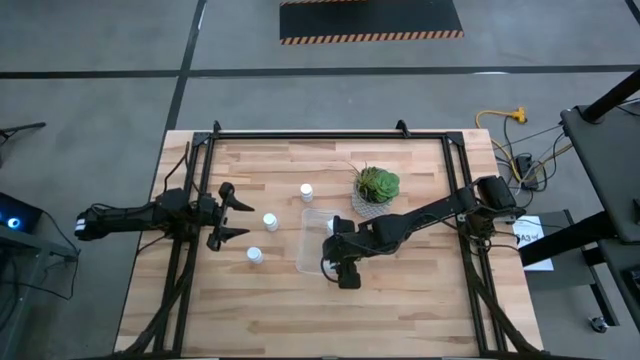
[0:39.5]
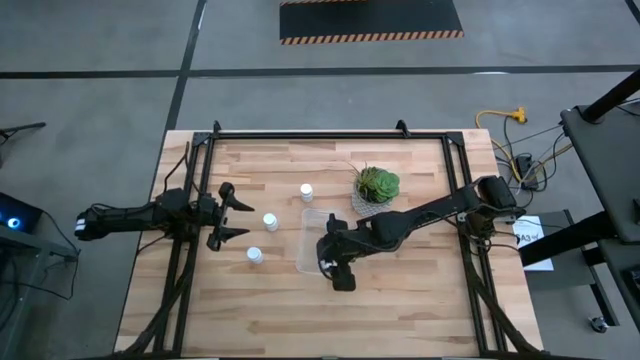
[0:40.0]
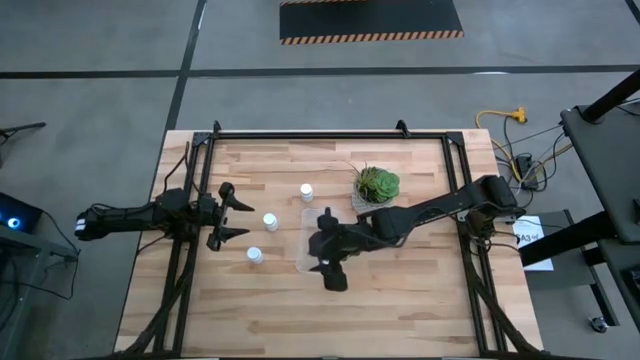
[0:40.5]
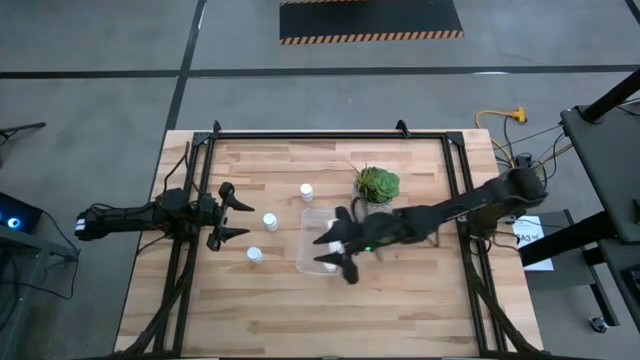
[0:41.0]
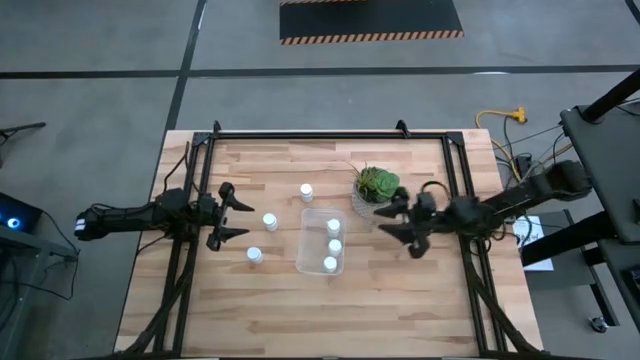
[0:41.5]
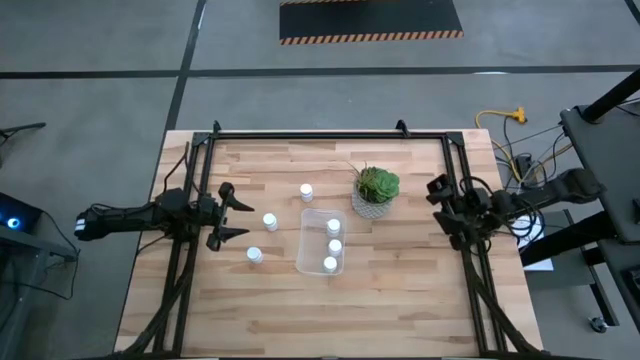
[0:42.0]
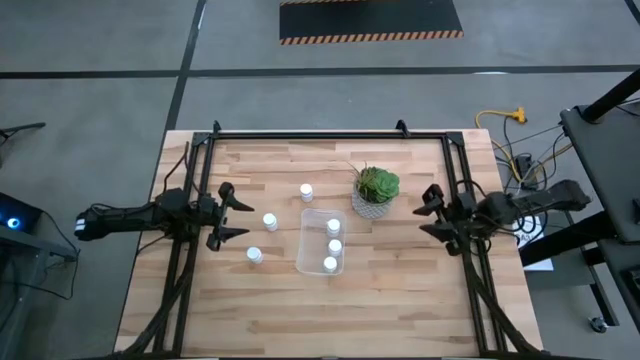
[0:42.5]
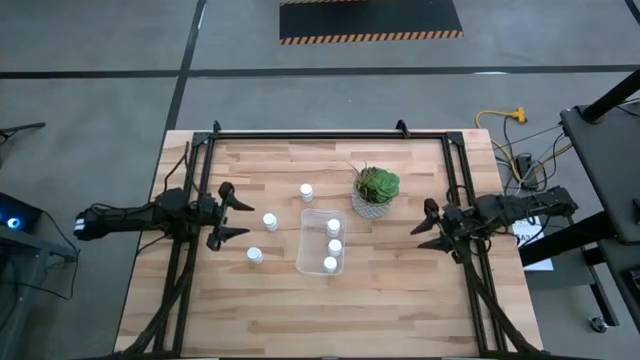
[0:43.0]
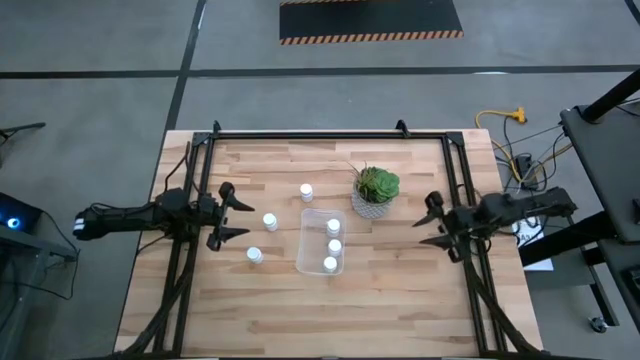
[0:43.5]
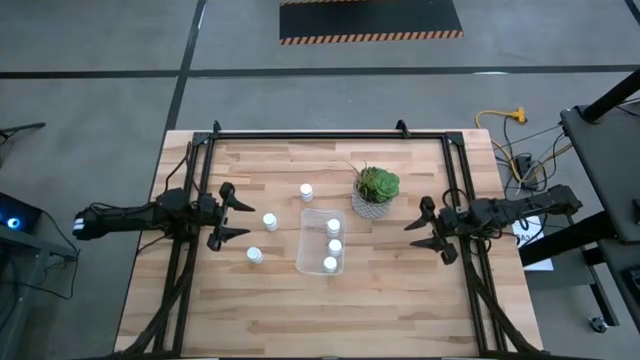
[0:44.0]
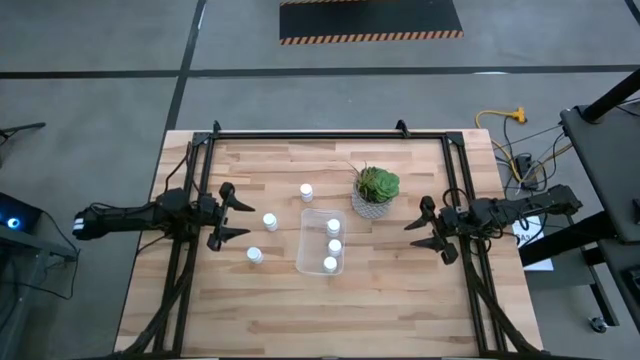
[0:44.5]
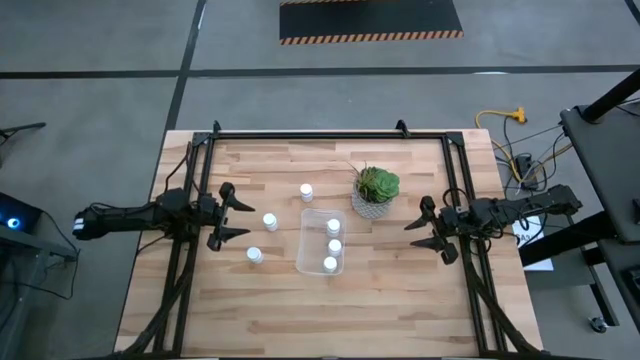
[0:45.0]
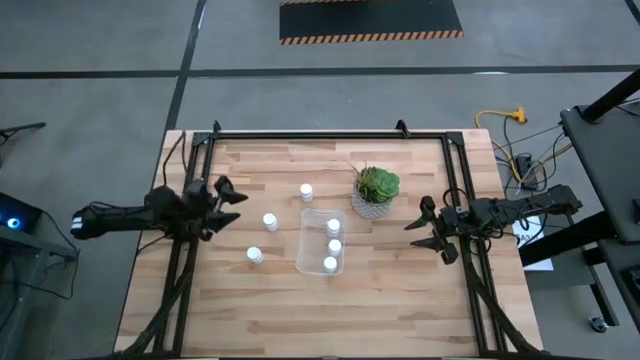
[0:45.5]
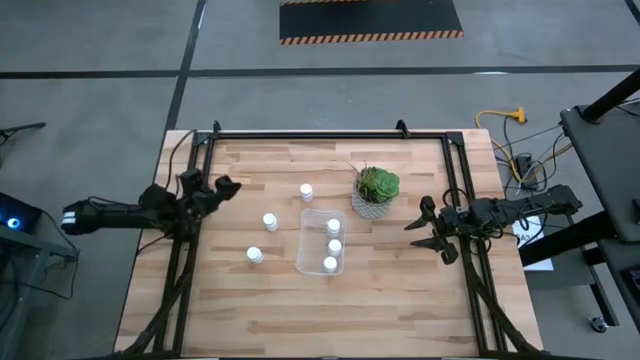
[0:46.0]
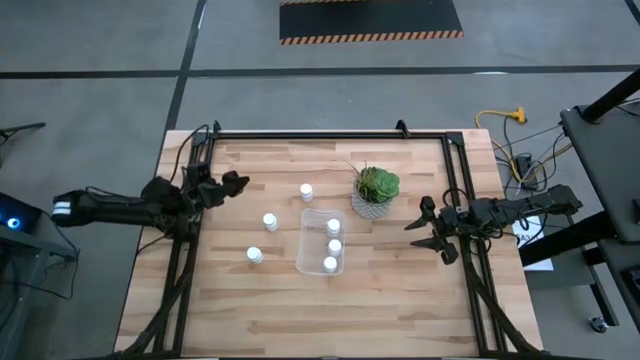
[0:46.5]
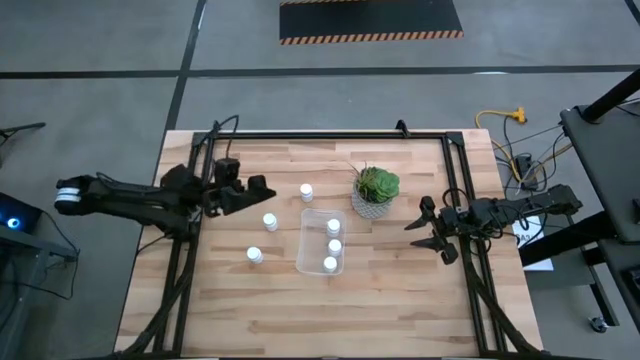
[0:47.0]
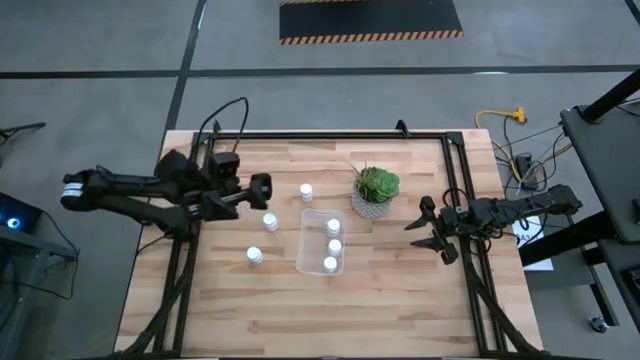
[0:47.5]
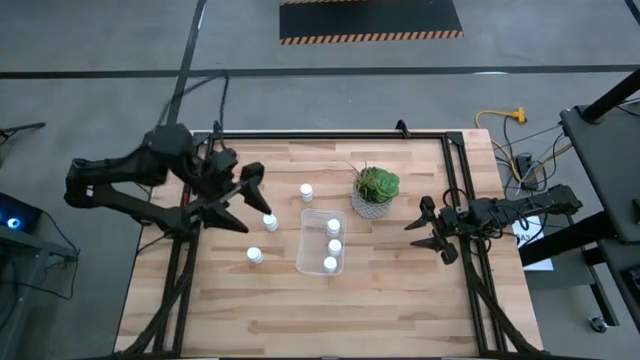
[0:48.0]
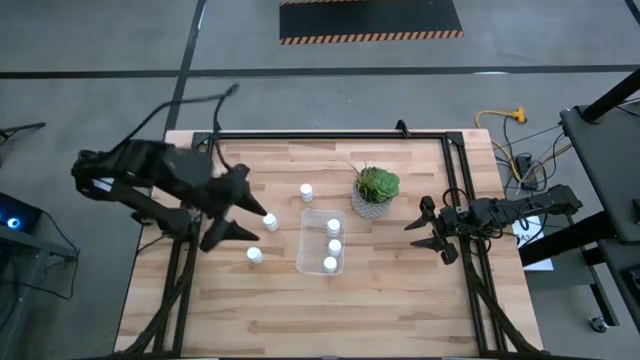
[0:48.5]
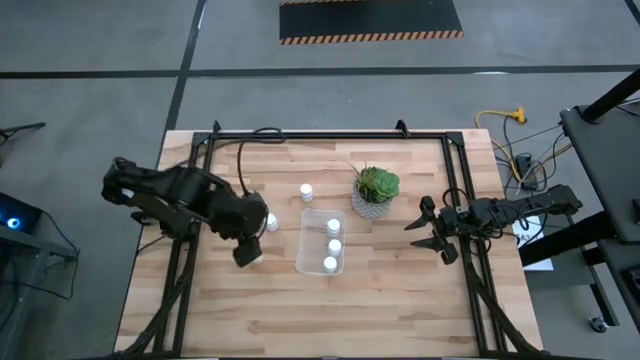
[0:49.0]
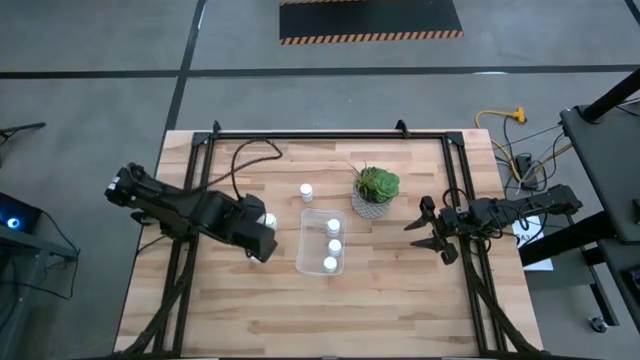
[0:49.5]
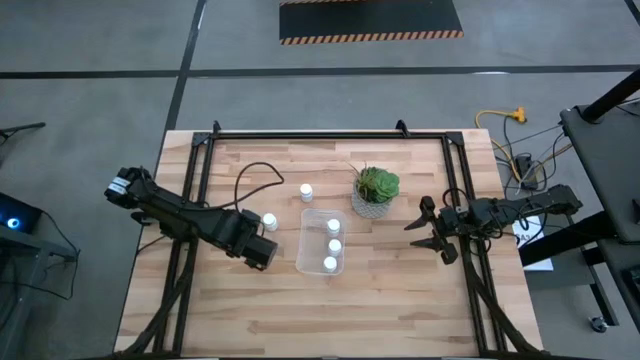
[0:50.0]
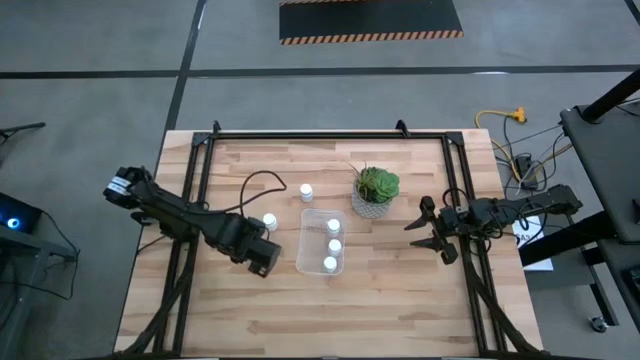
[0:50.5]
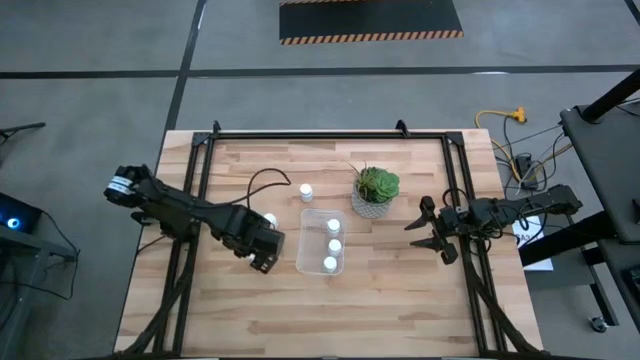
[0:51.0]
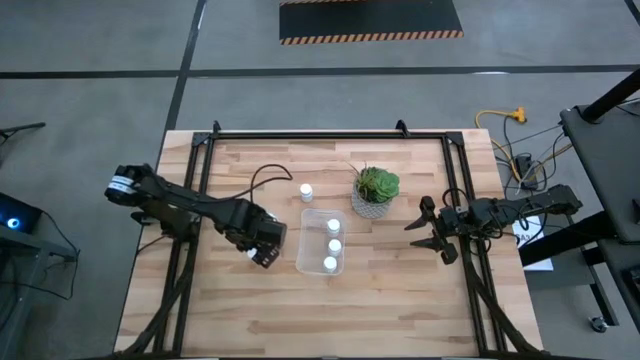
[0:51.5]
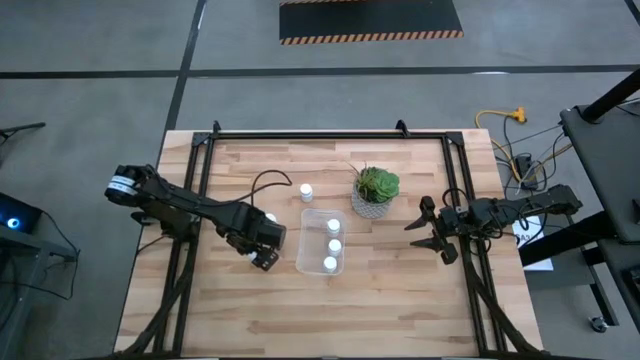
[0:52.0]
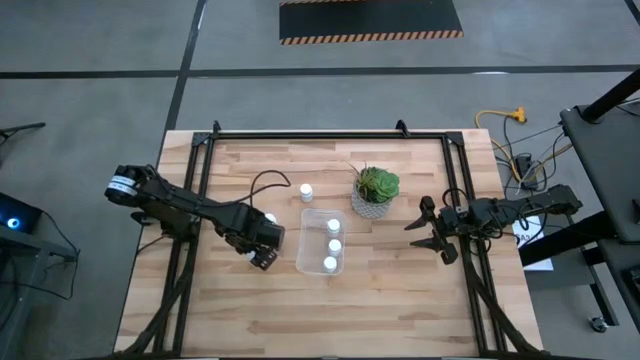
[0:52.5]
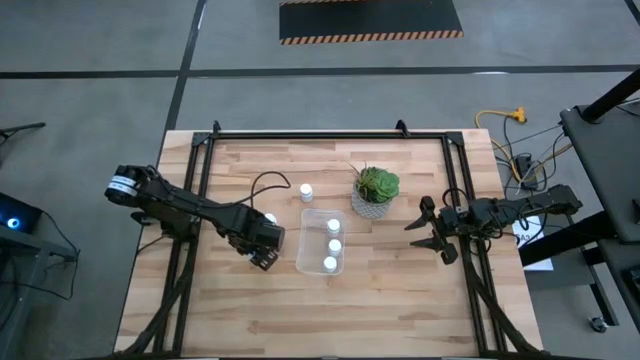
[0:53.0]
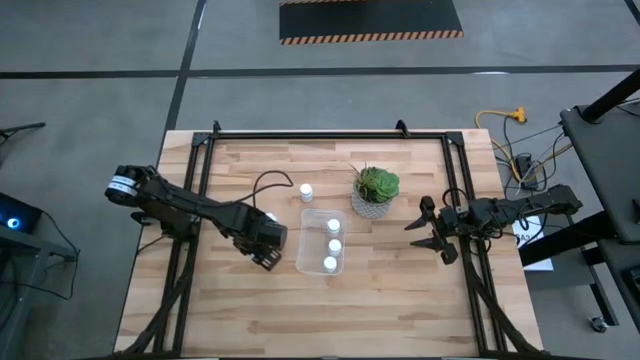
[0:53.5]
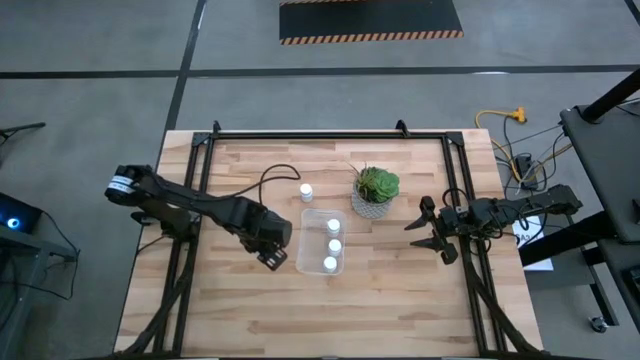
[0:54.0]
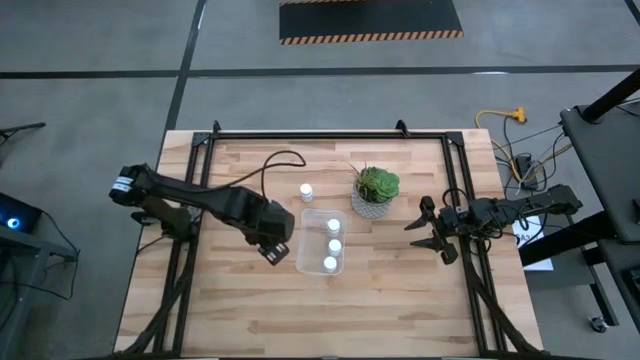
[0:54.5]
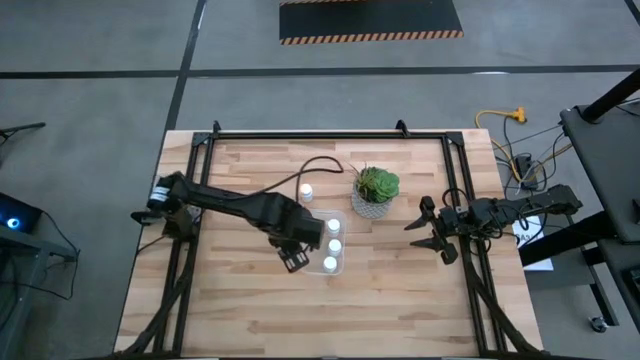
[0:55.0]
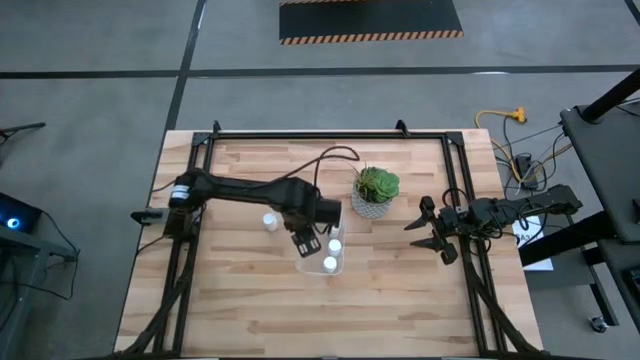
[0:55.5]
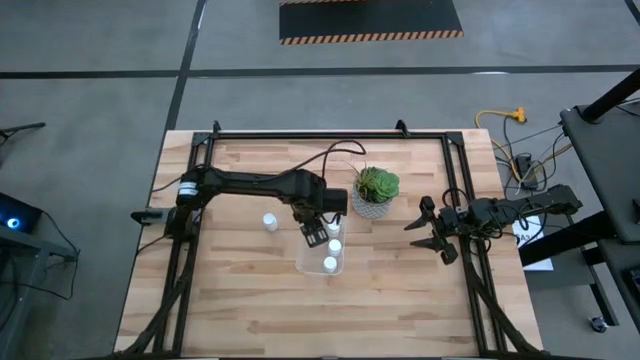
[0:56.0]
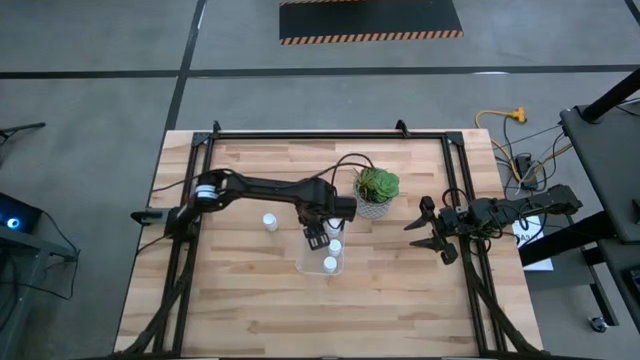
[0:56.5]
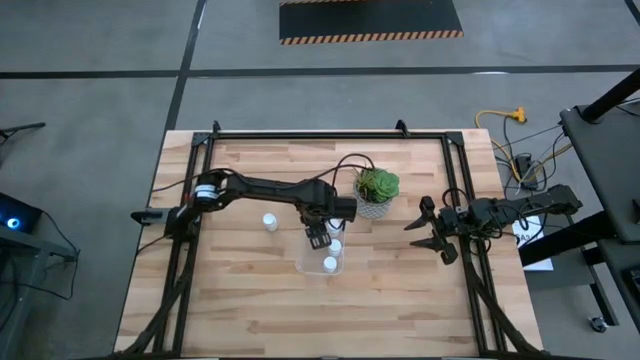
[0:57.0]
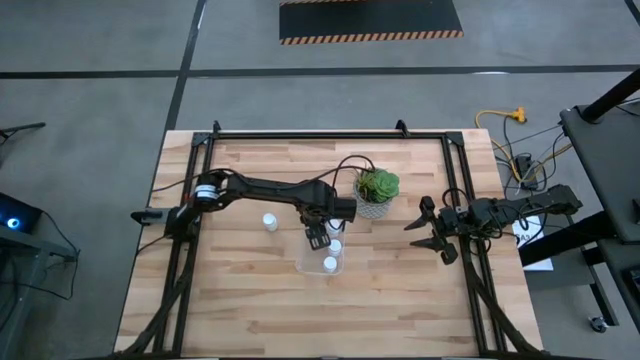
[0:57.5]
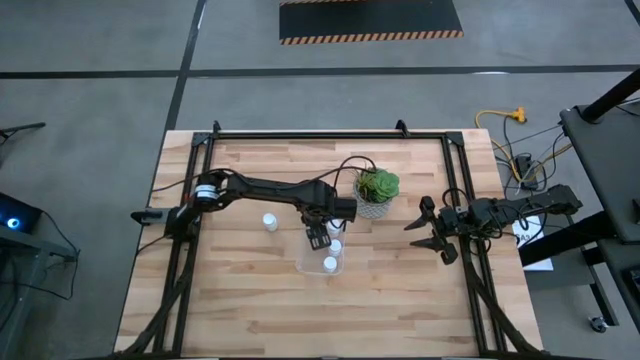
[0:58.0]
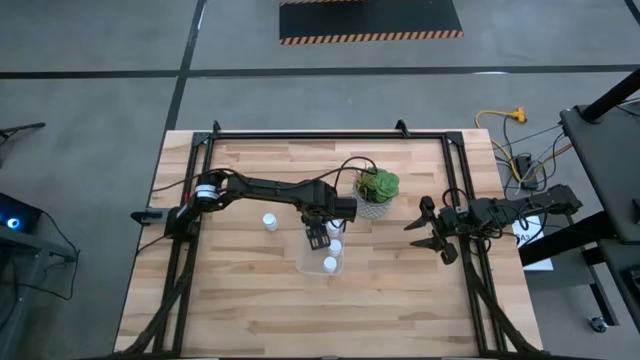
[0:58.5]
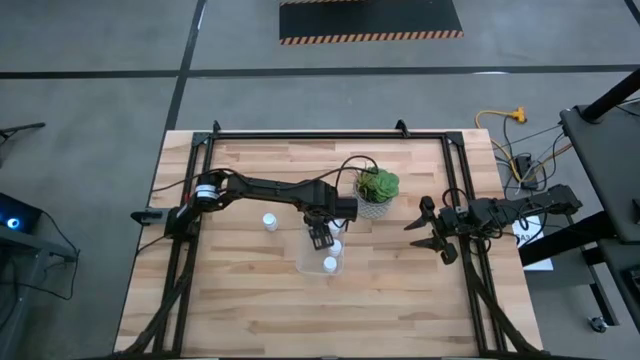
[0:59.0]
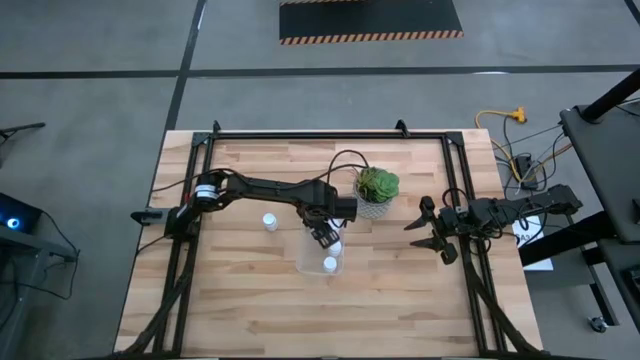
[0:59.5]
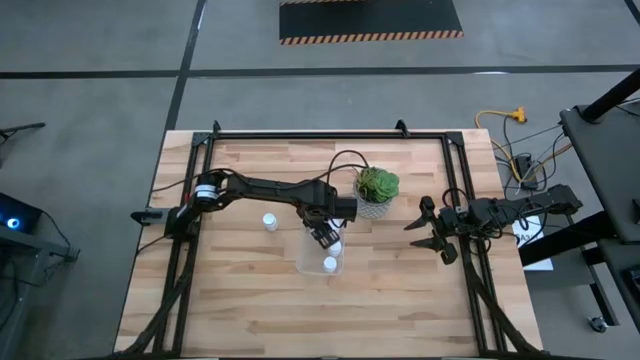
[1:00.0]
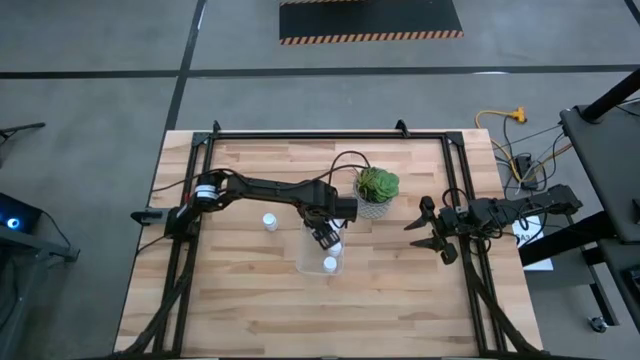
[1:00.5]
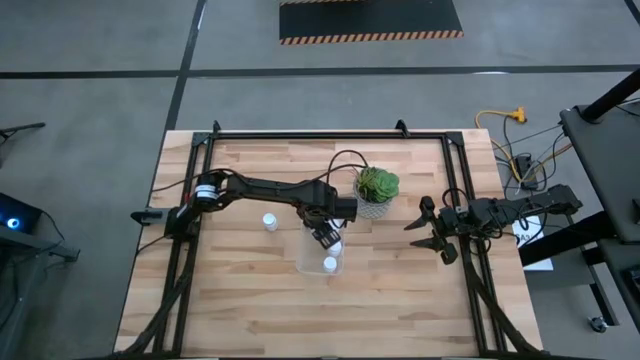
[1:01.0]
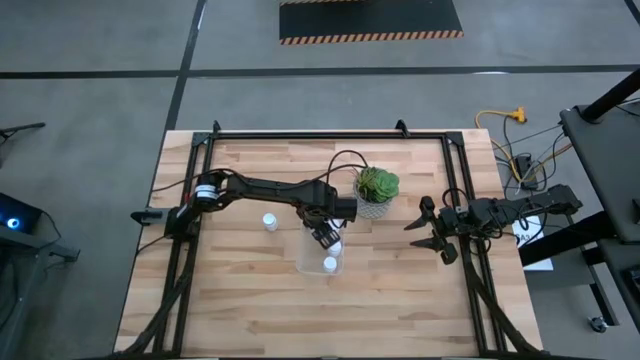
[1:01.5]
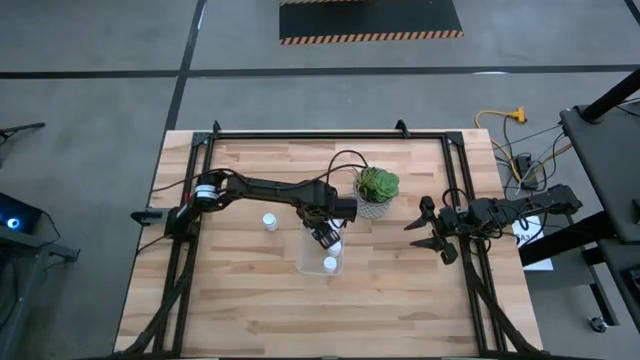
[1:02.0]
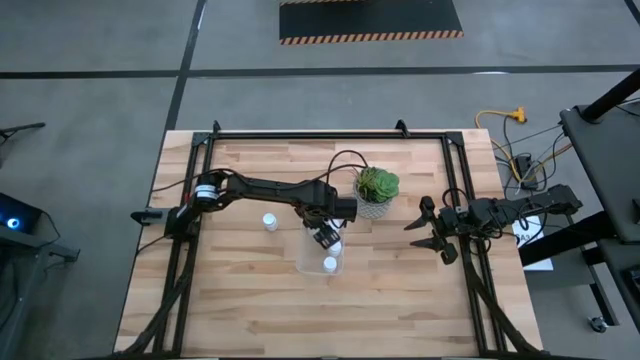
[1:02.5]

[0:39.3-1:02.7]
Task: Pick and place pill bottles into a basket
Put the white medicine bottle into the transparent bin
